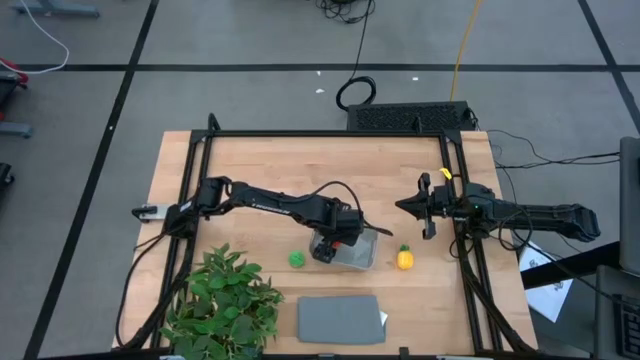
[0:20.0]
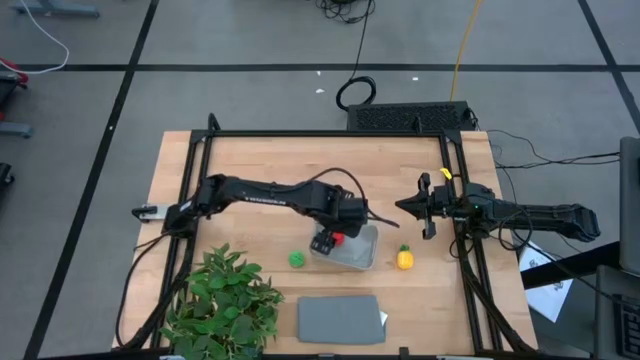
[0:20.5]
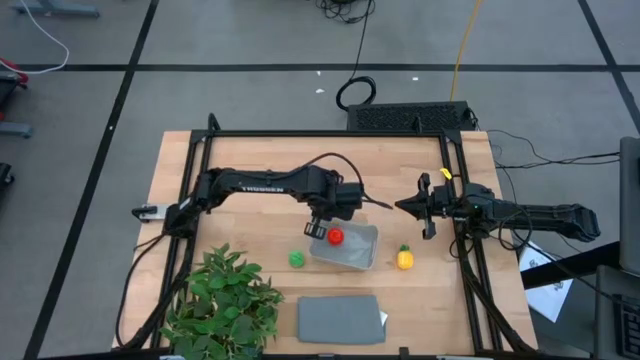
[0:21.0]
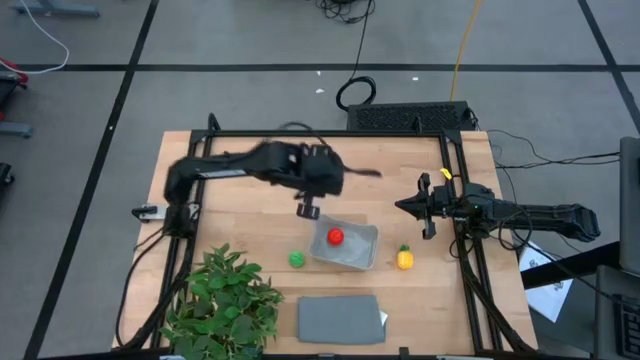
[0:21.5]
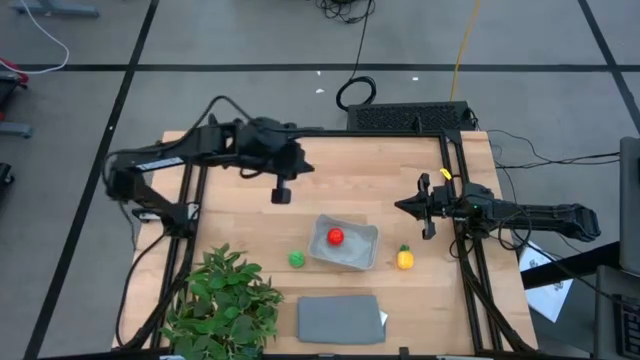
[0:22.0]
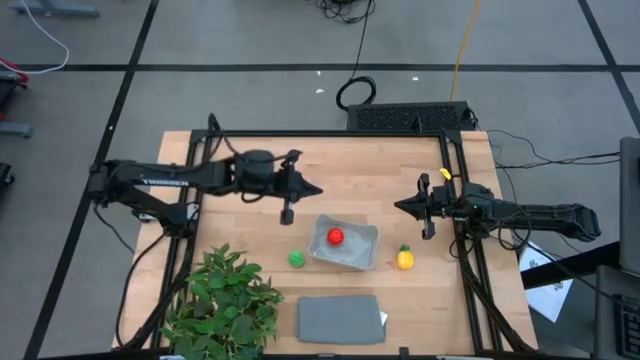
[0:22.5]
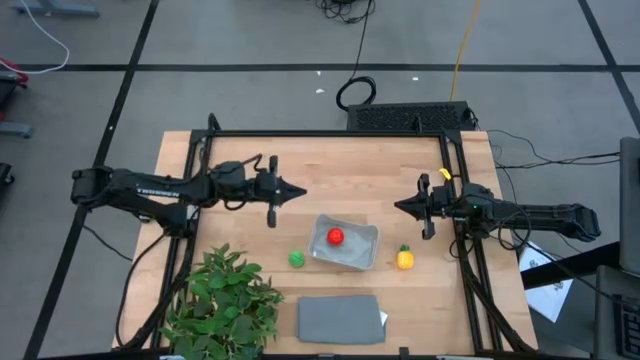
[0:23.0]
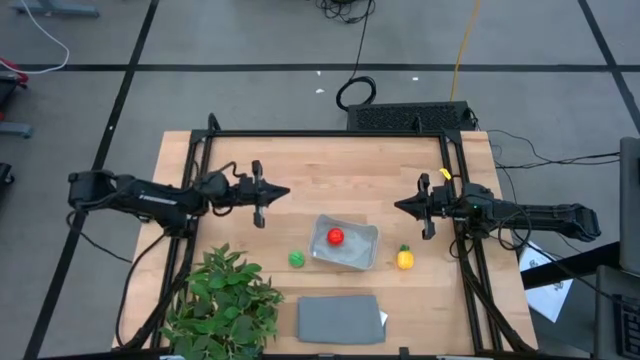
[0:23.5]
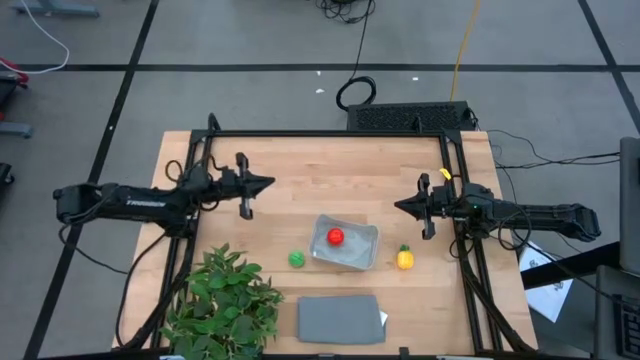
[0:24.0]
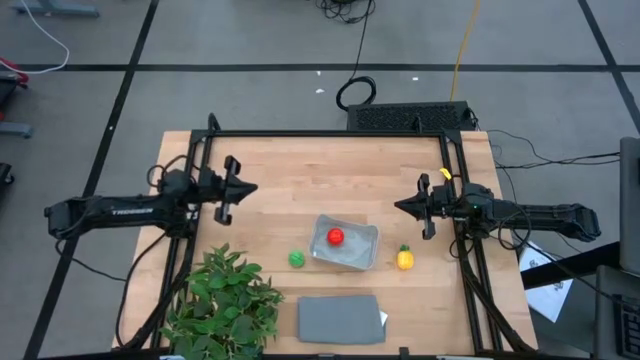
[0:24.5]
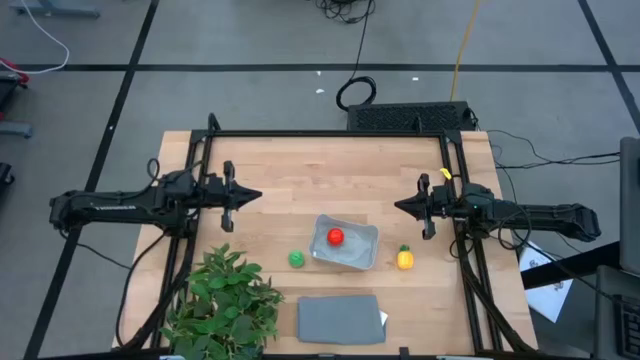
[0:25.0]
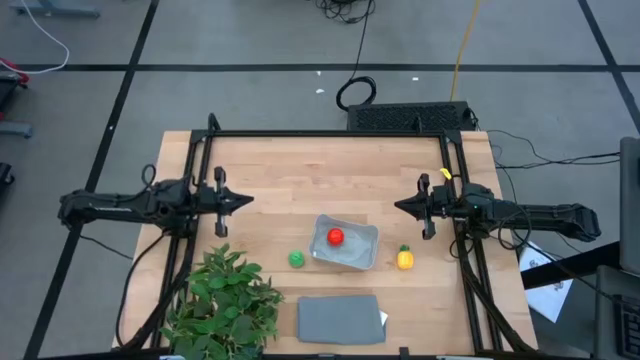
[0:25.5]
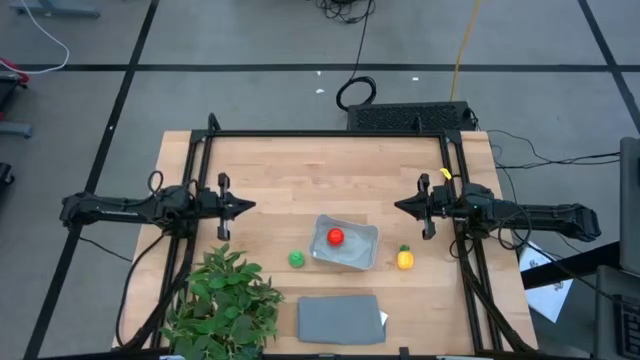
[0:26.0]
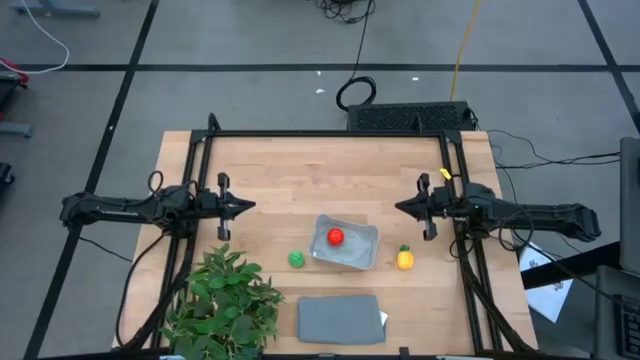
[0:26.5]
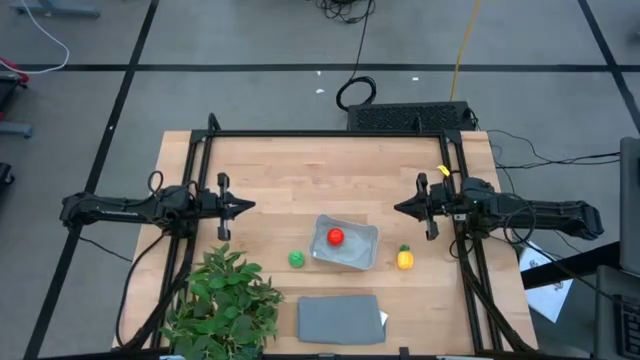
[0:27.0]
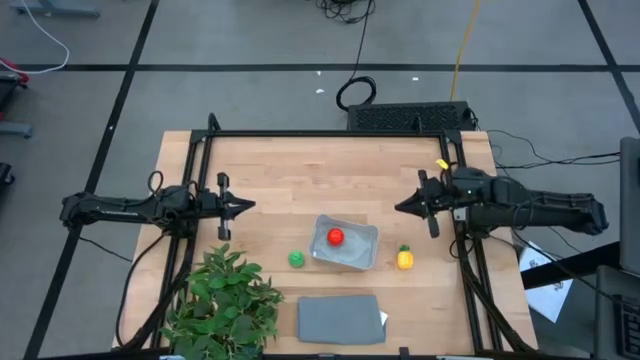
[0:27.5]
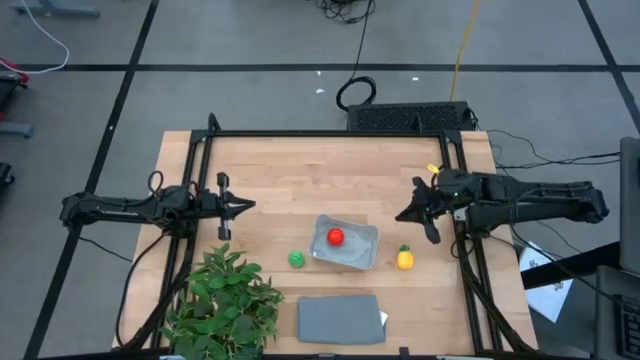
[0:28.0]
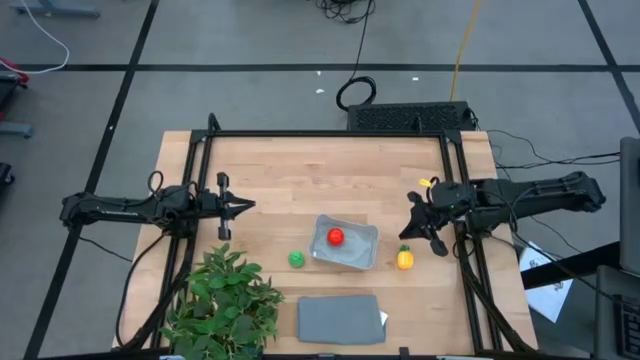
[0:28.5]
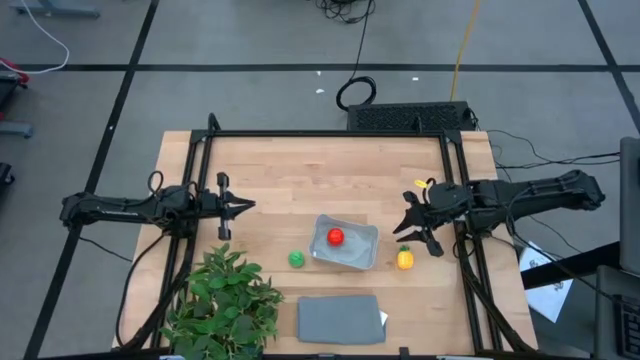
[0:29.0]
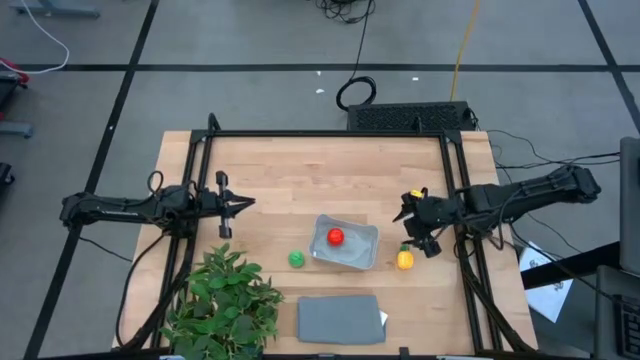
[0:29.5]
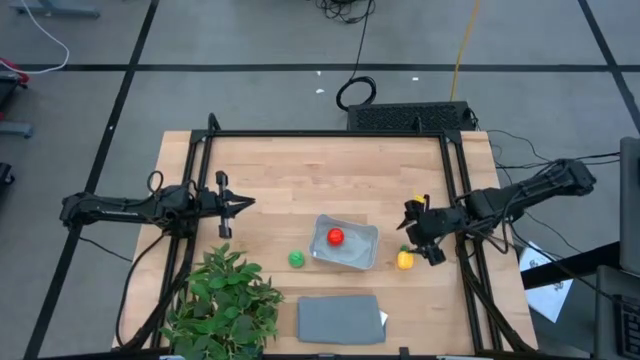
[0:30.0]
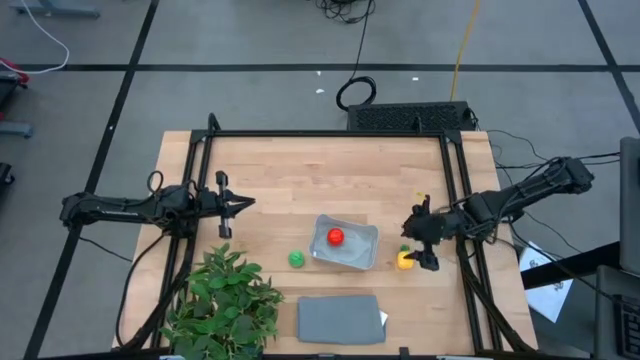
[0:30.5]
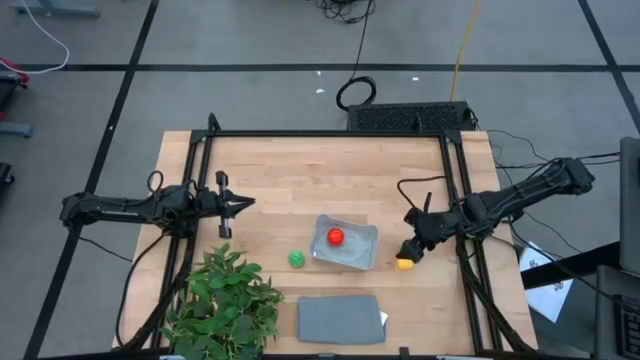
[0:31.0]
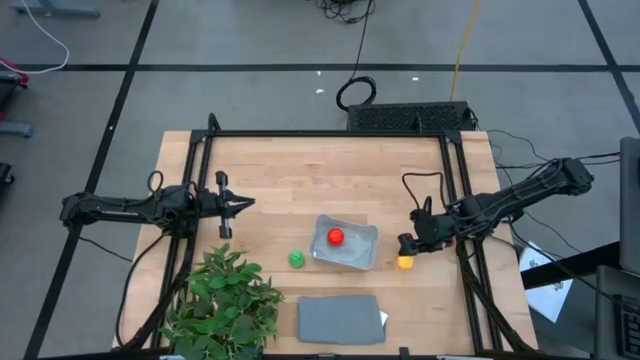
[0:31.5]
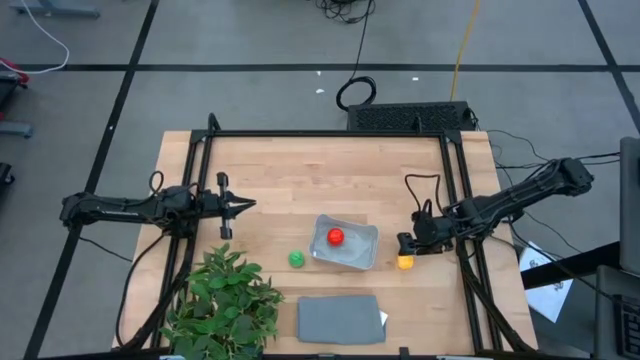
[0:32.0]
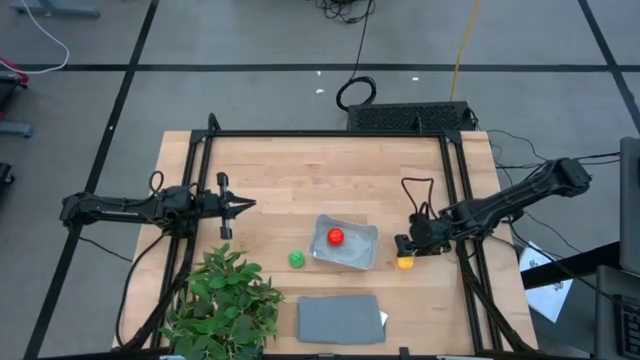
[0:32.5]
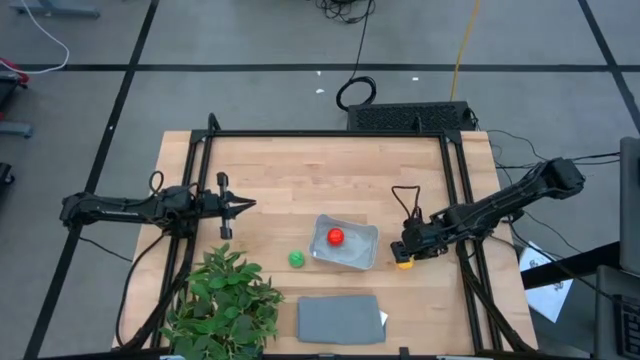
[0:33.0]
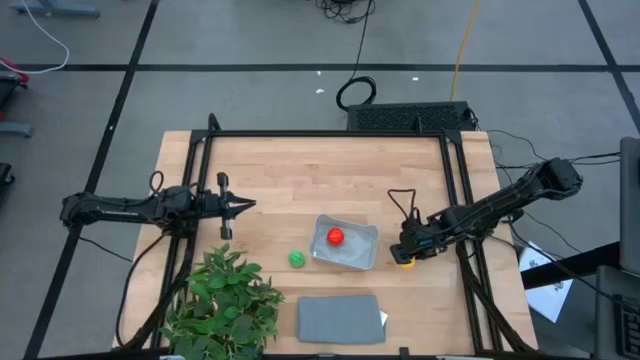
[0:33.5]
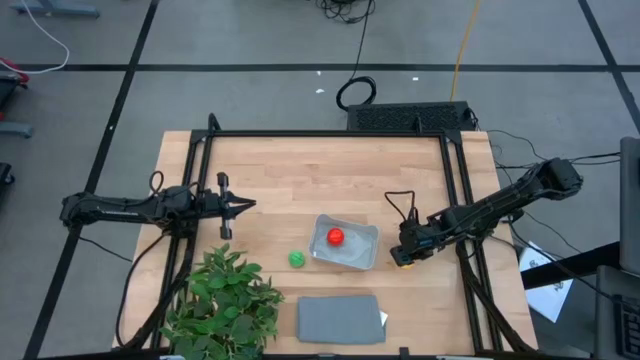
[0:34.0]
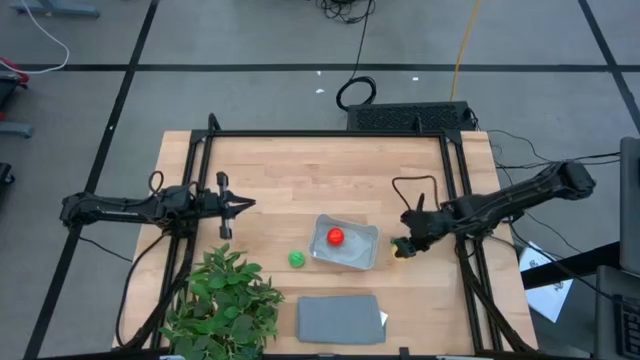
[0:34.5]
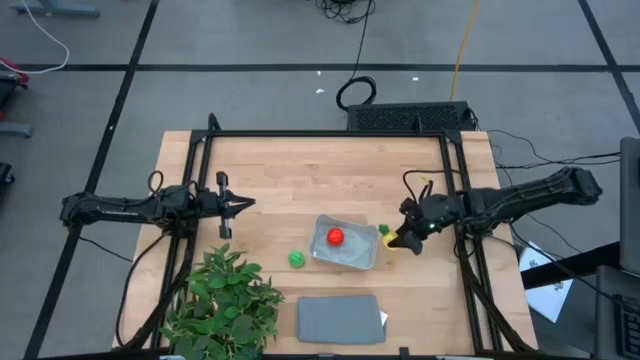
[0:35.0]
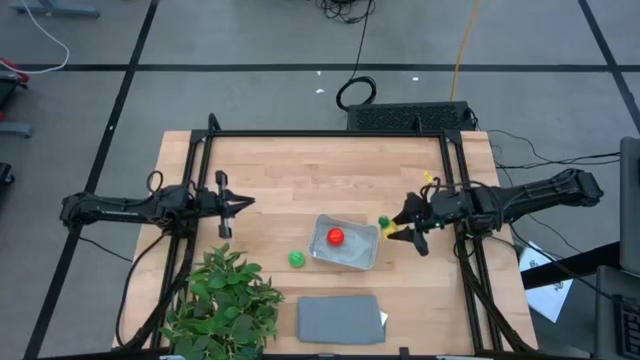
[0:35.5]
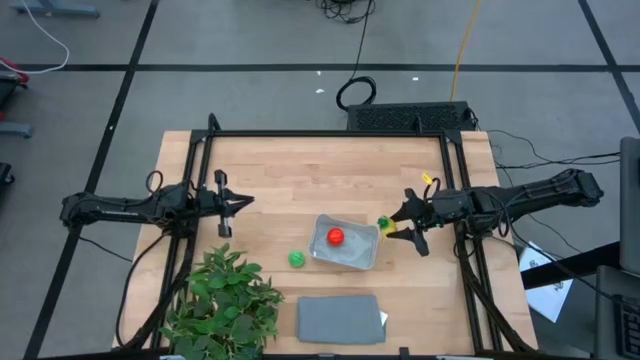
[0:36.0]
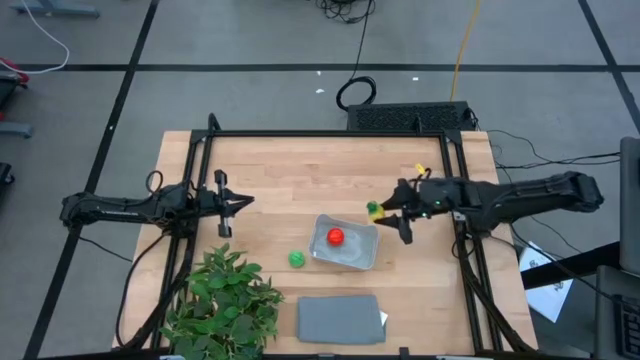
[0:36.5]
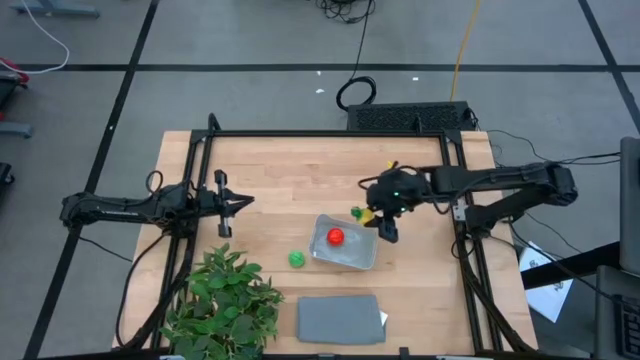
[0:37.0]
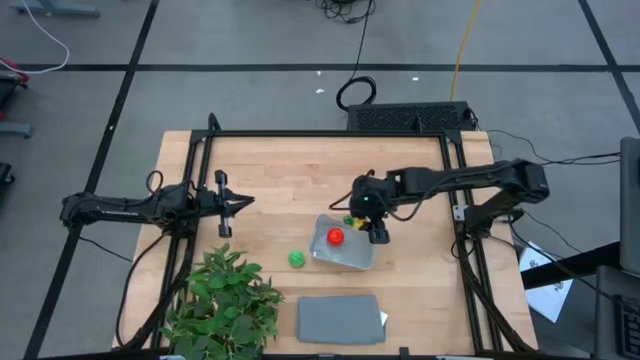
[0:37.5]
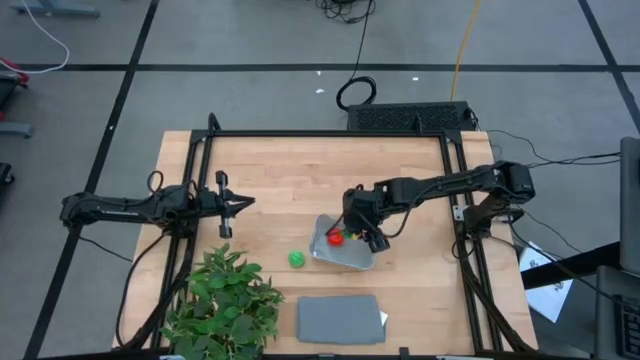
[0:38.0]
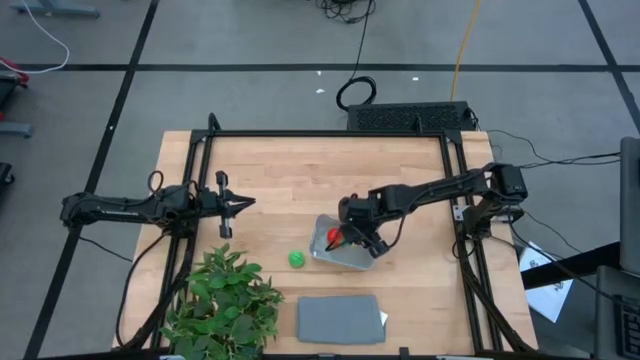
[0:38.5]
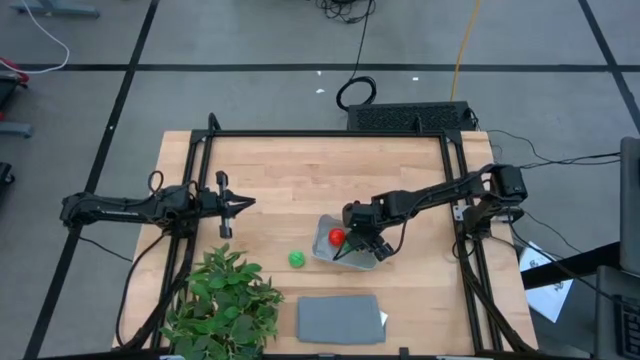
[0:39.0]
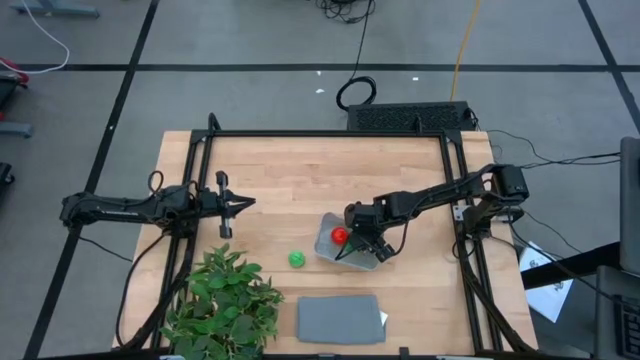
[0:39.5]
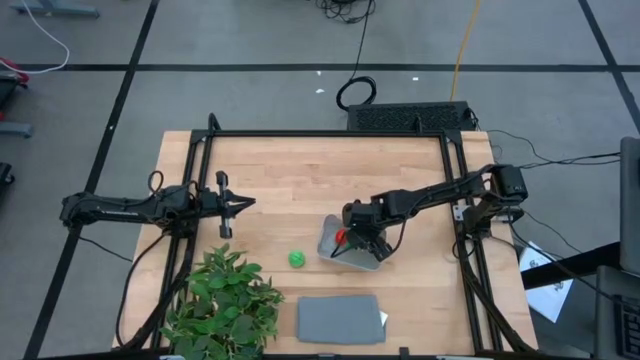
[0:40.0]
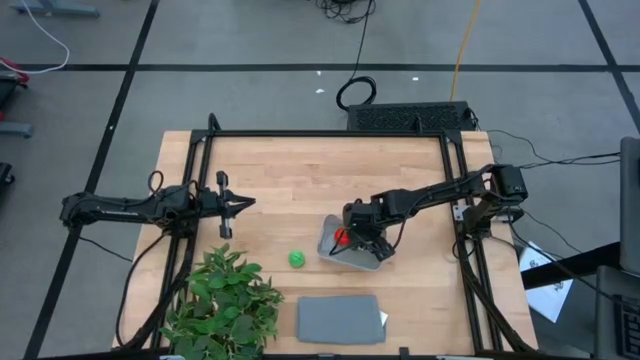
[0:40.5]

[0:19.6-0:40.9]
Task: Pick and placing Produce into tupperware
Put the yellow pineapple into the gray bin

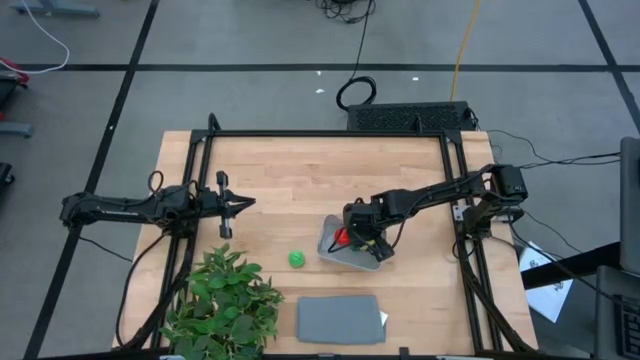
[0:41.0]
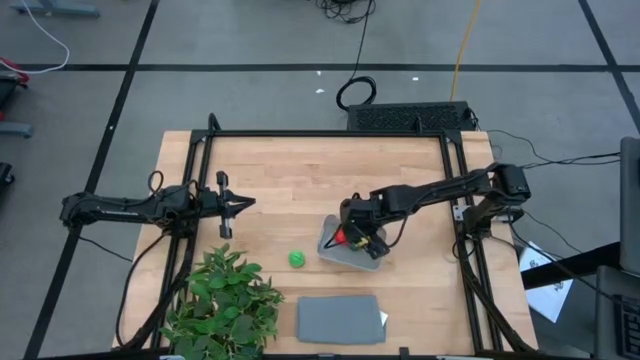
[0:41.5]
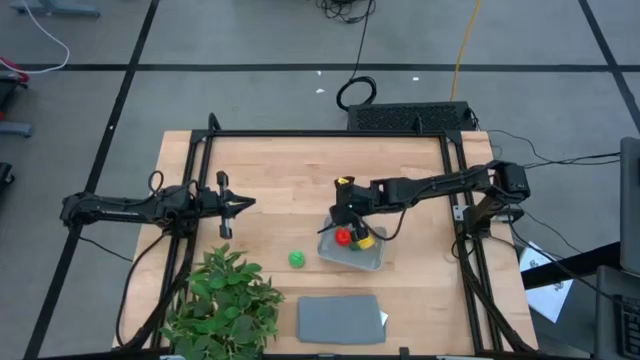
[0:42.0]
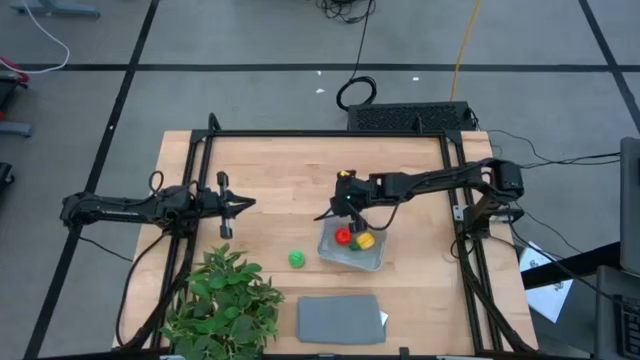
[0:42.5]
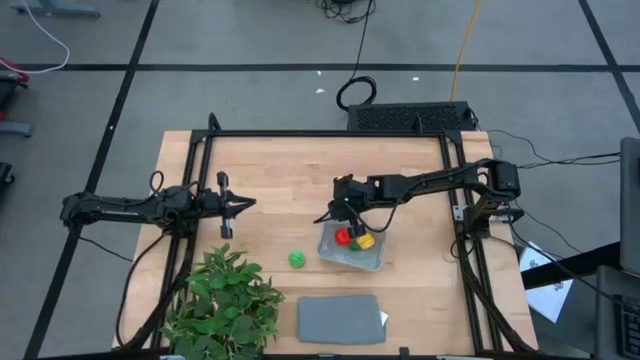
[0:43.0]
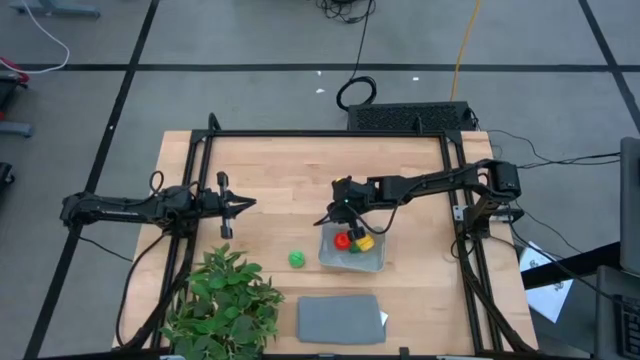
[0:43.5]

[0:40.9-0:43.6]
Adjust the gray bin on the table
